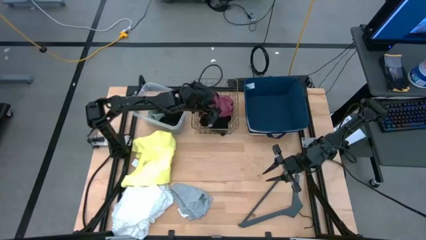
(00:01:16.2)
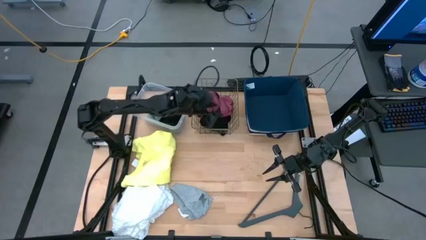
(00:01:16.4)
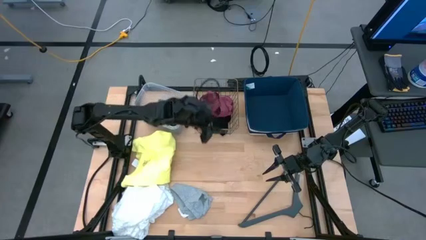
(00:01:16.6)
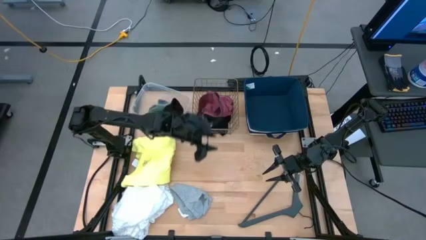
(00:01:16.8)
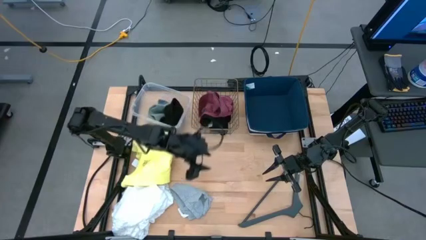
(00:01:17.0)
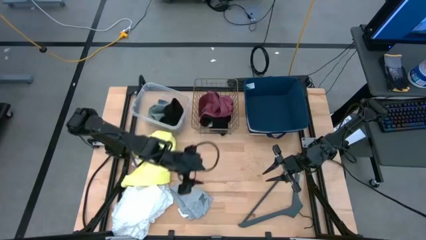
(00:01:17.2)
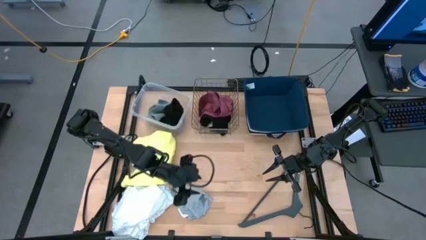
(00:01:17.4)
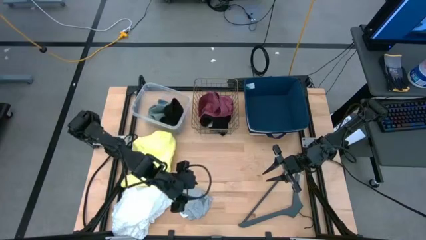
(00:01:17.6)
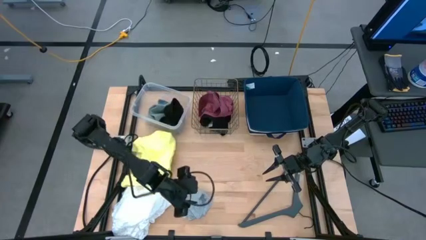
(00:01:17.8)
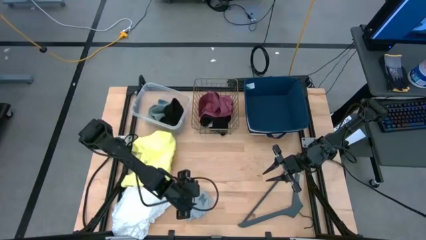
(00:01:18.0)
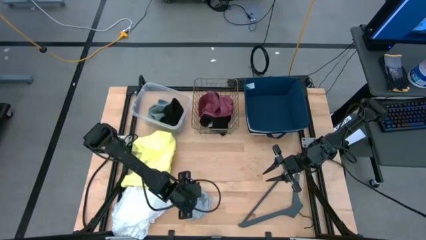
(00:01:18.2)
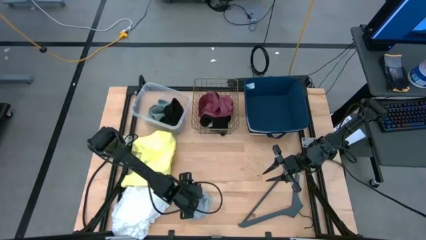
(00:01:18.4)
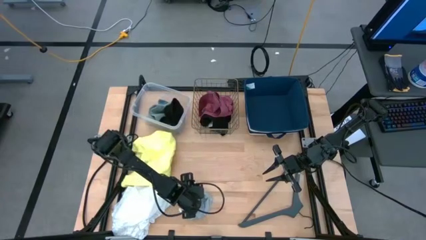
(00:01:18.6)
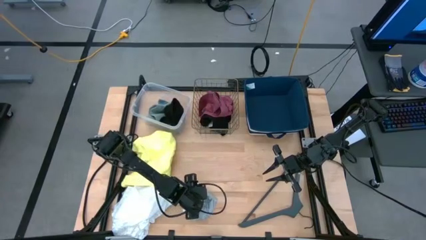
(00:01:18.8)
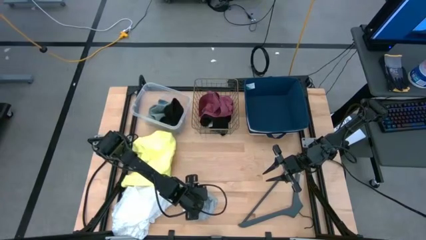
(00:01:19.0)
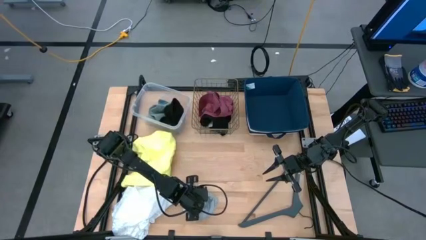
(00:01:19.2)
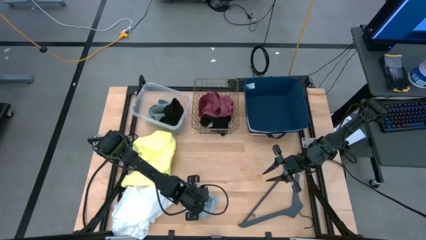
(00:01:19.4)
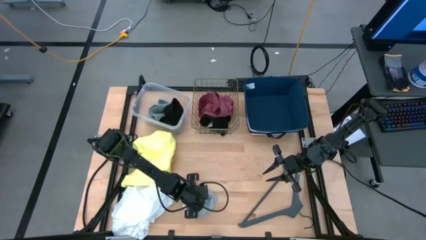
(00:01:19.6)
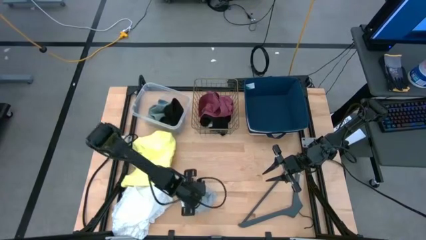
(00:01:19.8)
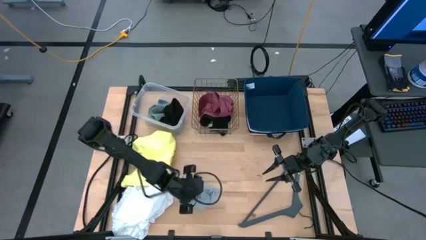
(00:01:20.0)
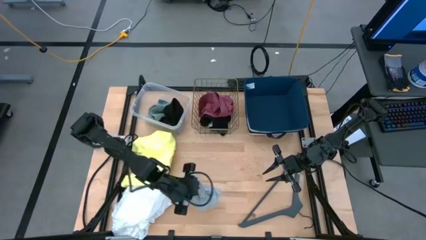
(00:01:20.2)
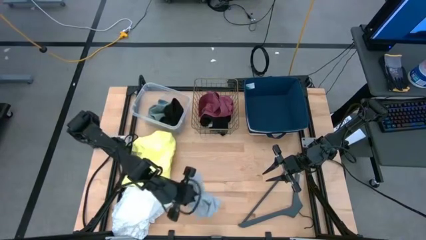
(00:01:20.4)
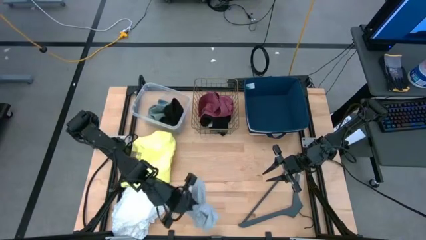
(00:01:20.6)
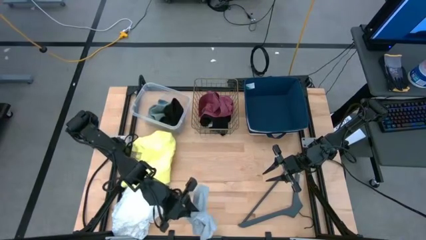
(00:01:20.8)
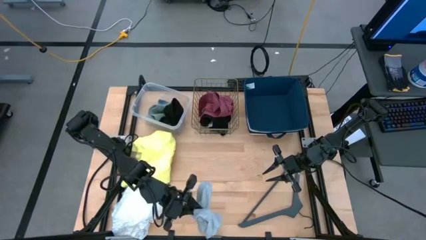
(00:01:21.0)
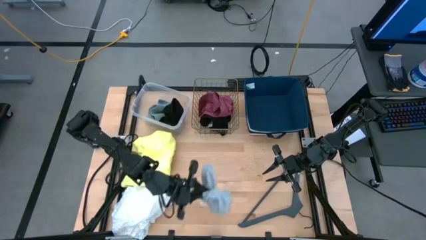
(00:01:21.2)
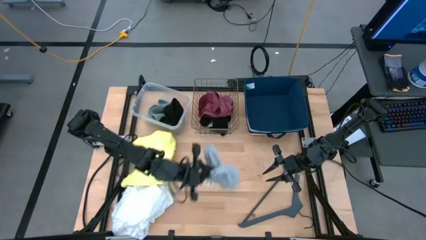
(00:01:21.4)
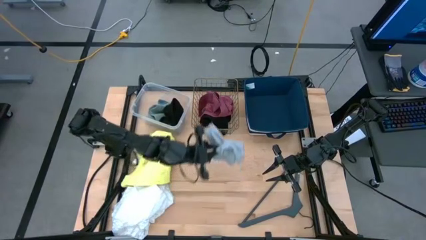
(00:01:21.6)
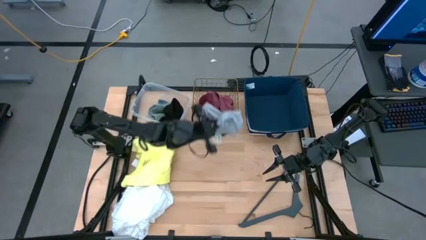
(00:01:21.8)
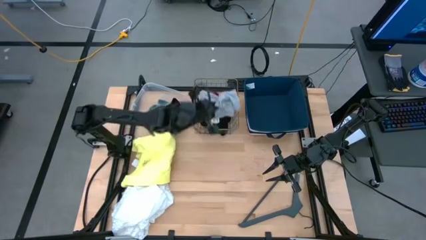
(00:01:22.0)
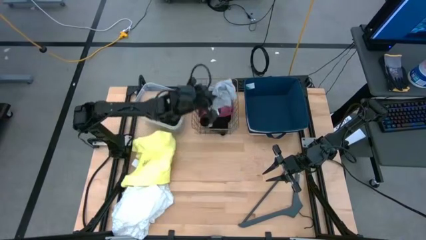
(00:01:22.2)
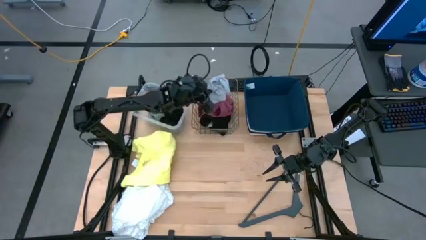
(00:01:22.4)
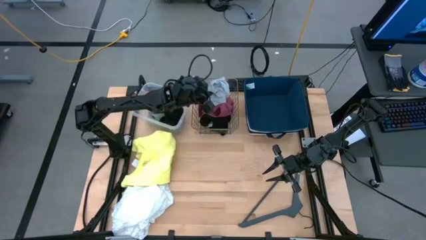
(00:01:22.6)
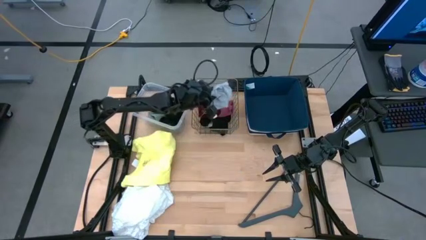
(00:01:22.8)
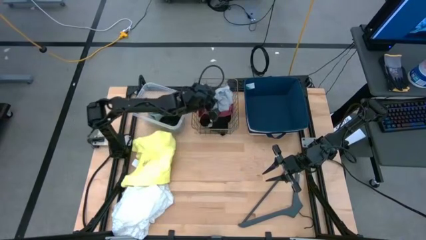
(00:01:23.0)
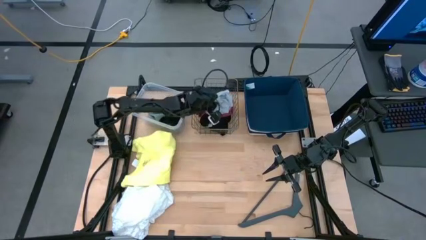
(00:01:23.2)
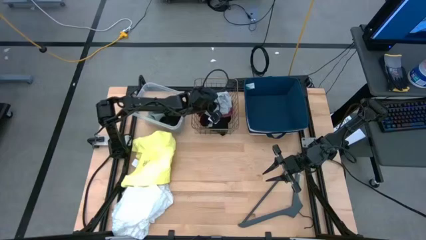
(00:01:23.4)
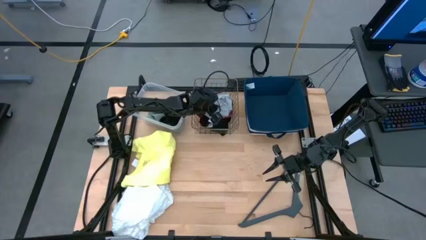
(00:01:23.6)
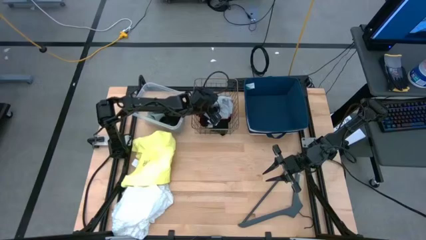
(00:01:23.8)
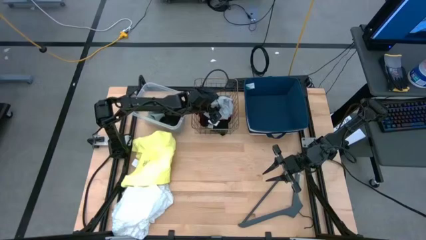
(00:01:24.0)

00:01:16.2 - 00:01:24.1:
Task: Pick & Place Cloths
Put the gray underwear into the wire basket

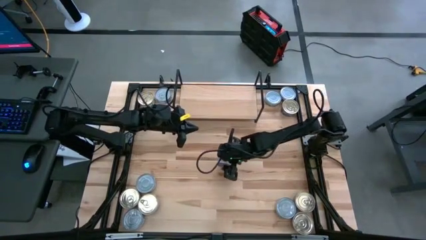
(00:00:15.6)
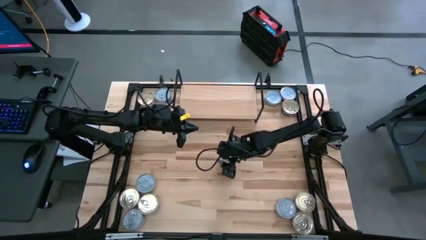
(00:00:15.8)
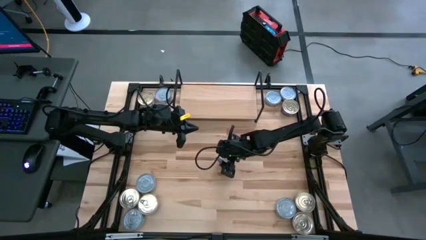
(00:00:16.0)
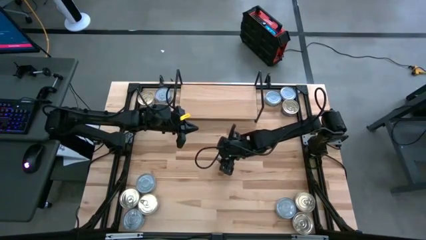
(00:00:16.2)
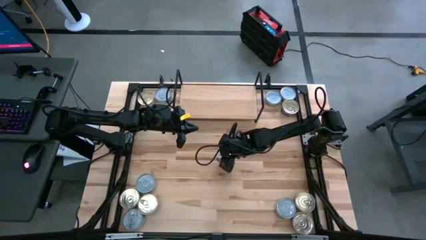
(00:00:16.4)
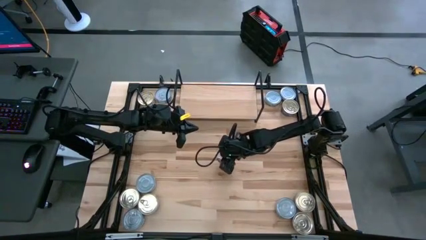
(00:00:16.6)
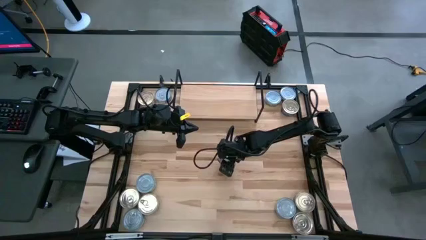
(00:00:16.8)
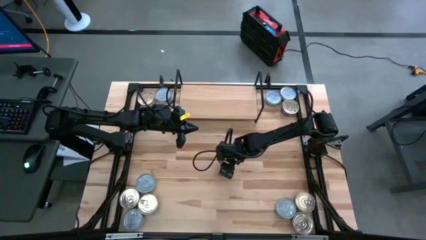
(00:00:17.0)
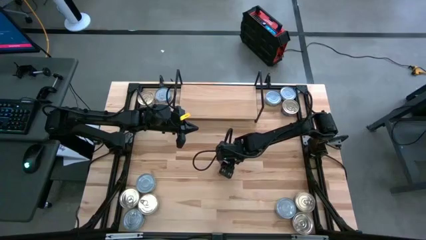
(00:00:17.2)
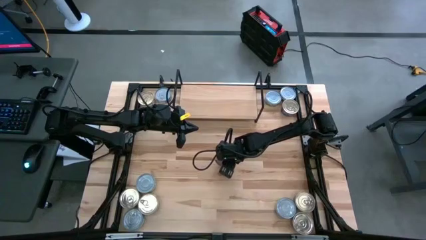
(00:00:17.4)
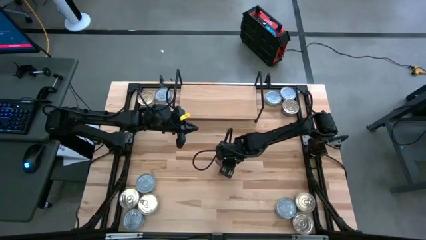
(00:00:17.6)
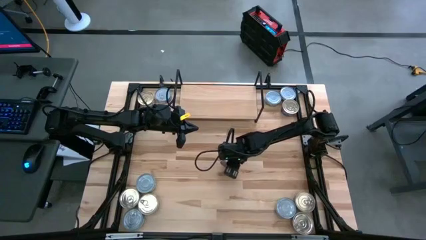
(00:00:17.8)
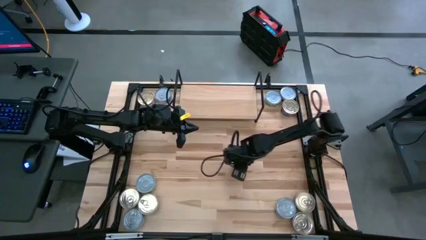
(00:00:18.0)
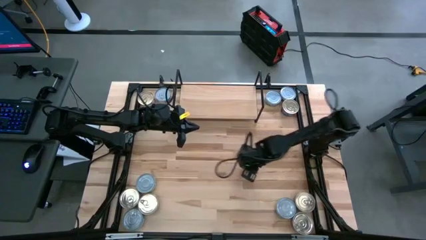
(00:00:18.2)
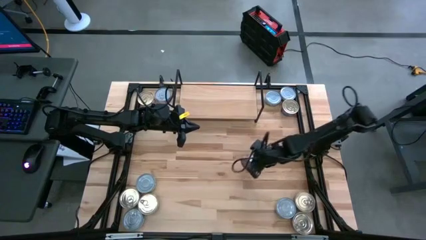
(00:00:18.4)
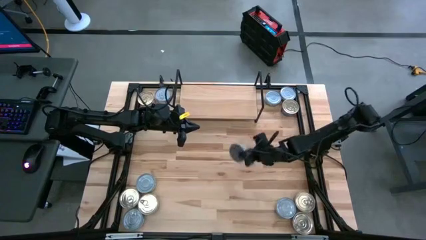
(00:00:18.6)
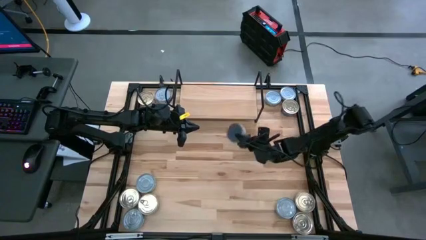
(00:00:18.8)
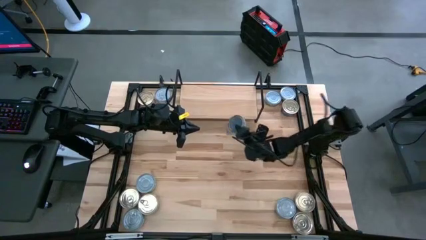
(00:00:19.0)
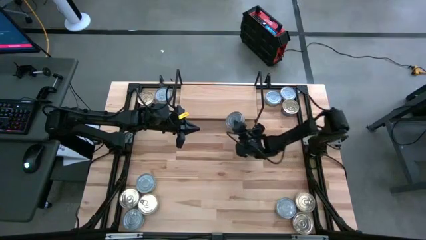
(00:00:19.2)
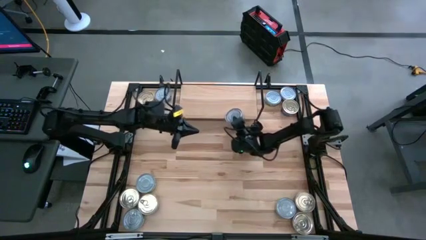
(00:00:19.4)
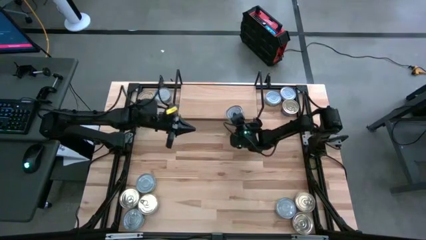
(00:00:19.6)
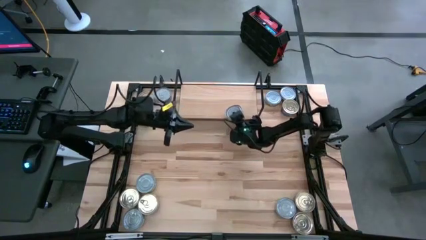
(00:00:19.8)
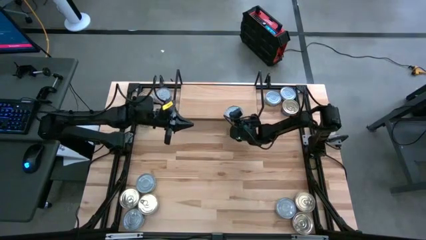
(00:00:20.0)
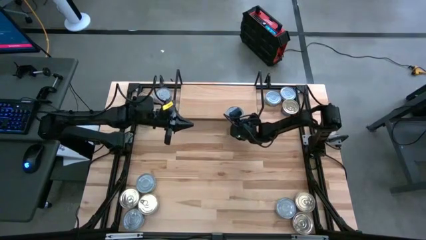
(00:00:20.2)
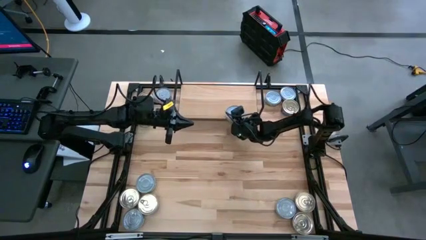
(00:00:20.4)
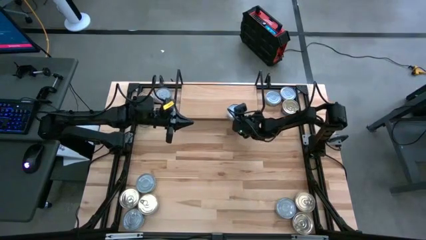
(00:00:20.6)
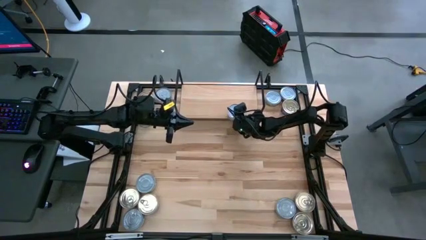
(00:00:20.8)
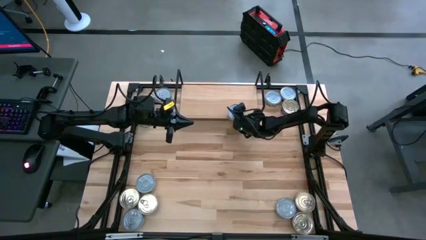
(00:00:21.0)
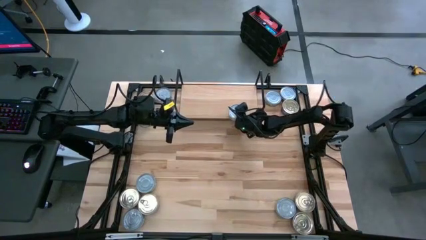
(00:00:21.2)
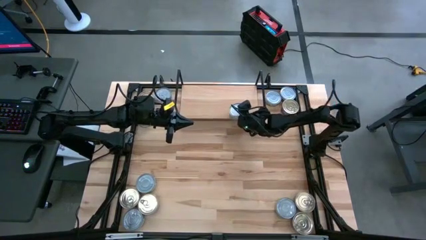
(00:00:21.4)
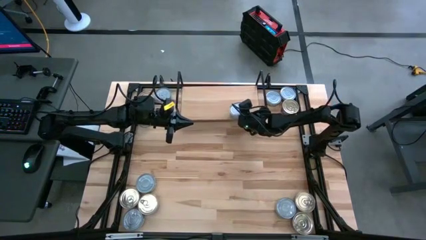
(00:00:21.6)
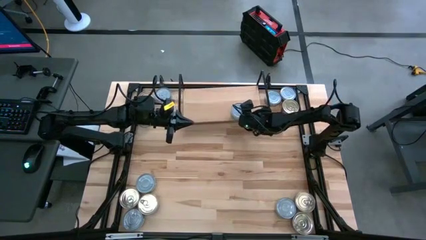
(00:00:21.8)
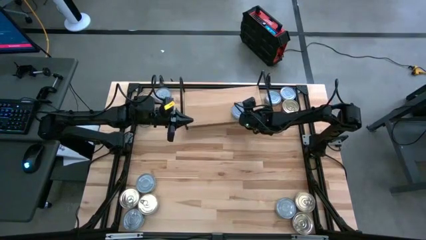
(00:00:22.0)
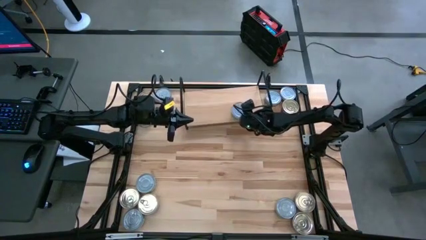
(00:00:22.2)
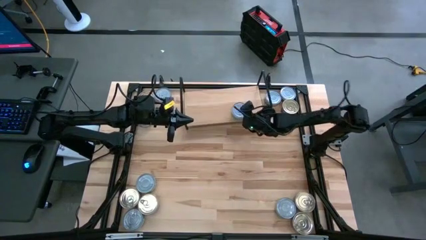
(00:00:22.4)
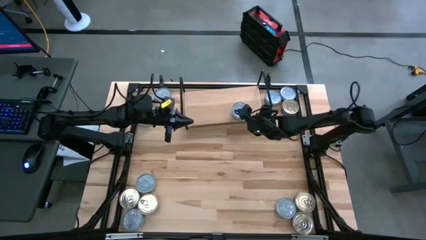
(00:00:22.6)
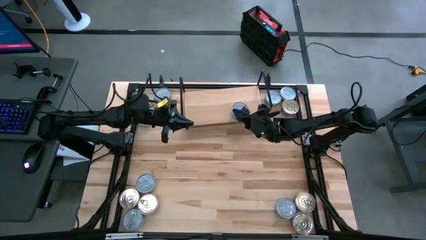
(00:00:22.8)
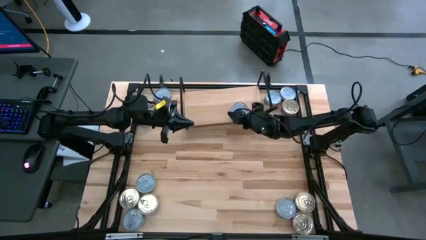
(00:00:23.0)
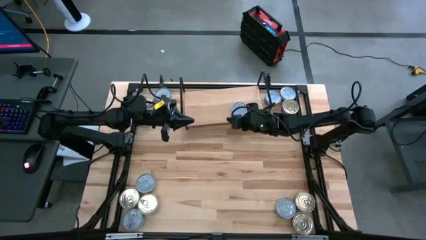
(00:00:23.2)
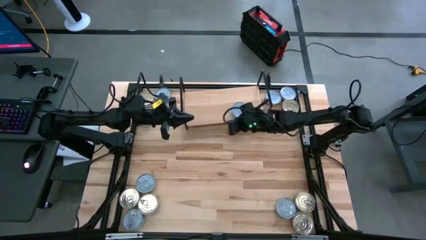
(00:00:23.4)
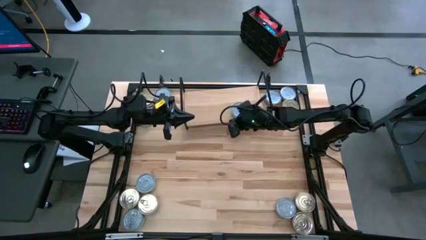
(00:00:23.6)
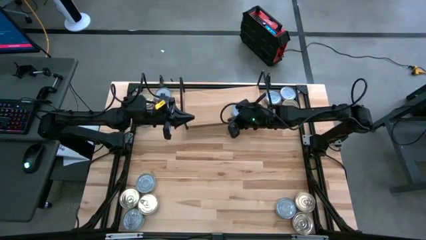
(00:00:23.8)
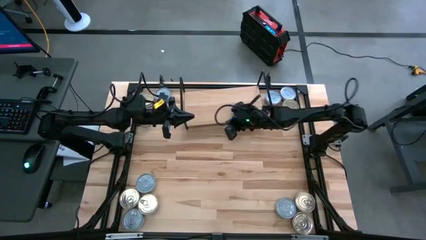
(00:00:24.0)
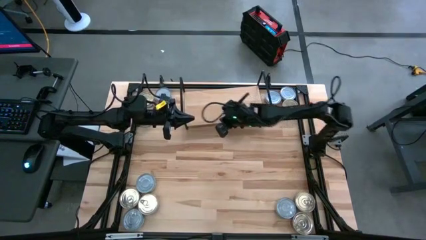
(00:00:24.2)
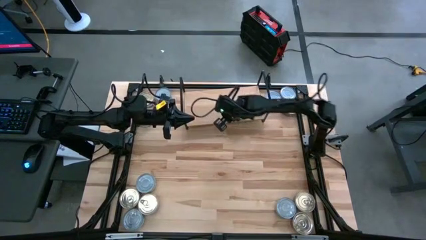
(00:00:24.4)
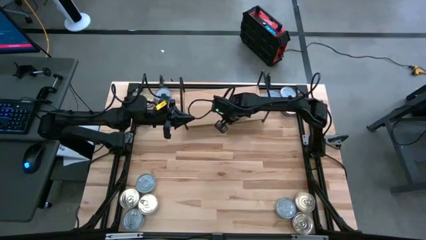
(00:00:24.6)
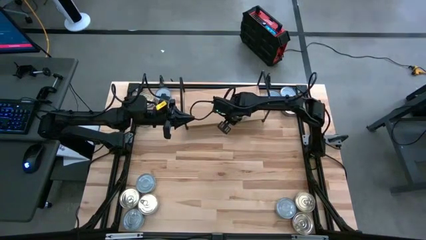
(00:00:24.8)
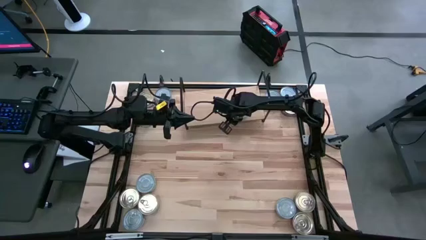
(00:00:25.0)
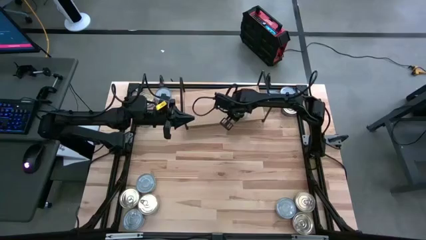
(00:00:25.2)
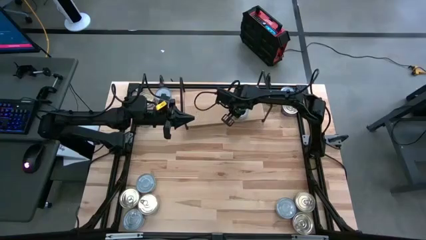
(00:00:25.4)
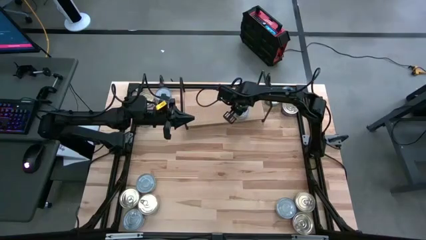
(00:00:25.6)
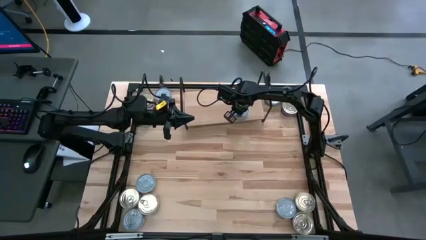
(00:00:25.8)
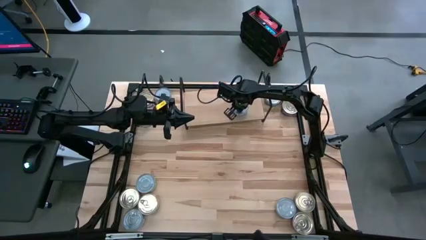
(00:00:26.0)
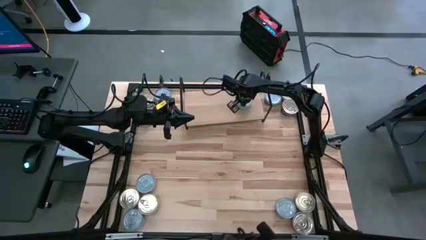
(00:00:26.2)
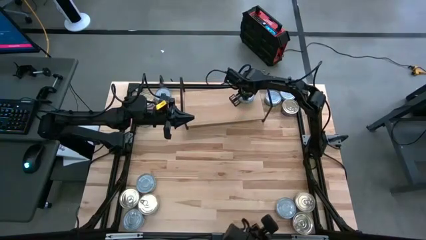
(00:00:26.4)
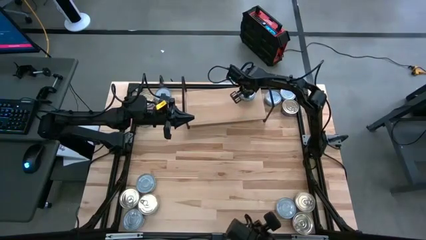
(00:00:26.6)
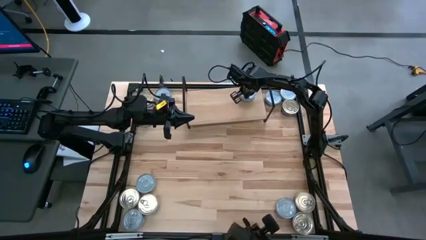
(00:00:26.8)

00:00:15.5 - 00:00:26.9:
Task: Stack canned seafood by type on shelf
Put the green tuna can on the shelf
